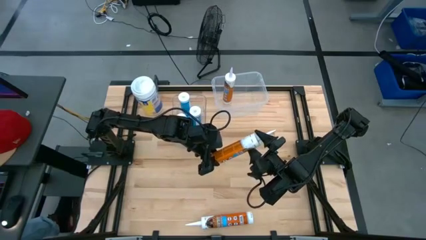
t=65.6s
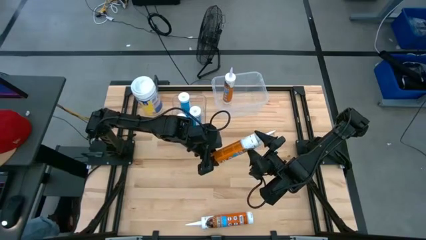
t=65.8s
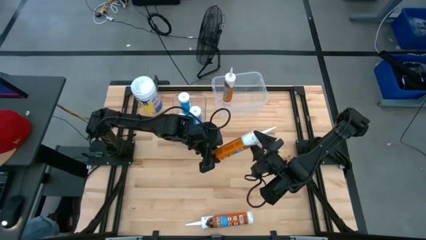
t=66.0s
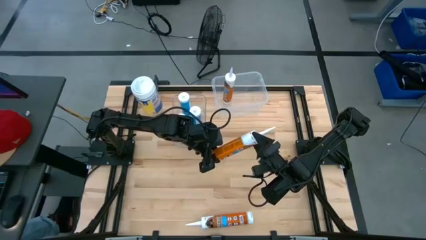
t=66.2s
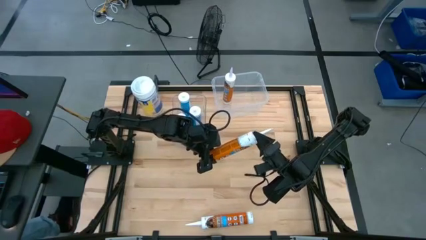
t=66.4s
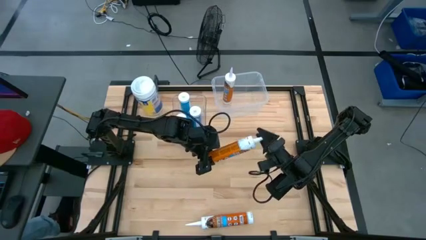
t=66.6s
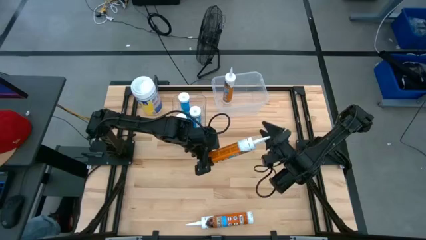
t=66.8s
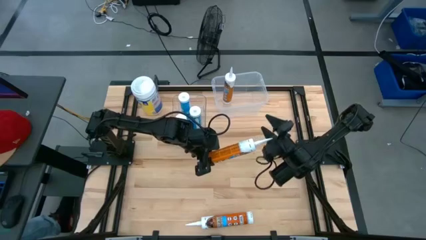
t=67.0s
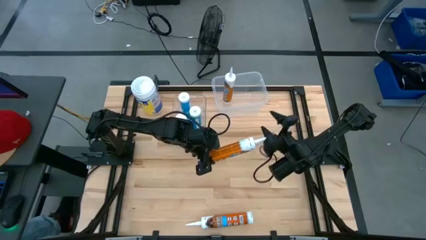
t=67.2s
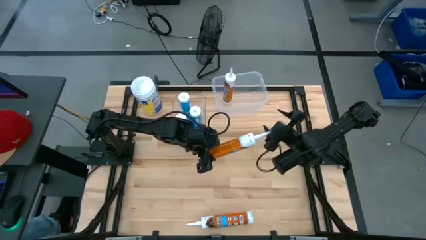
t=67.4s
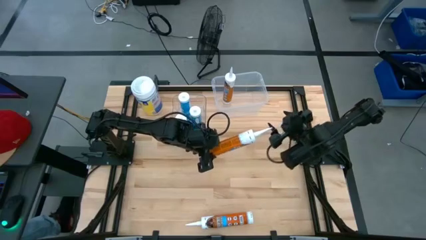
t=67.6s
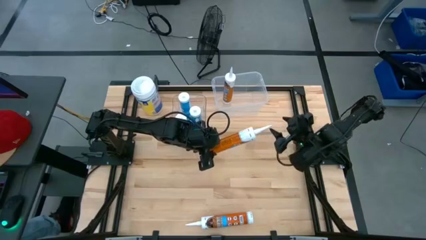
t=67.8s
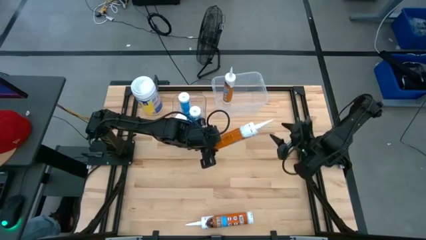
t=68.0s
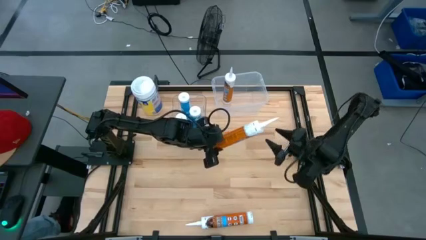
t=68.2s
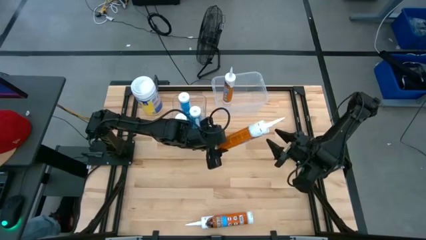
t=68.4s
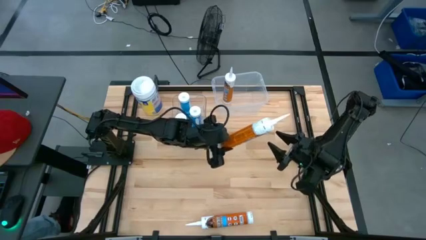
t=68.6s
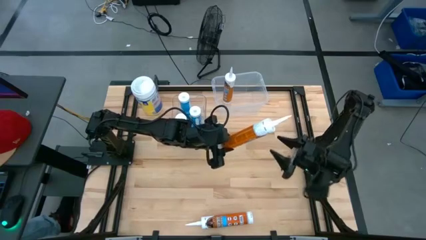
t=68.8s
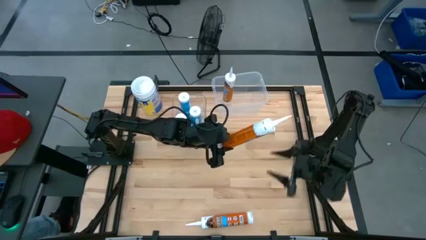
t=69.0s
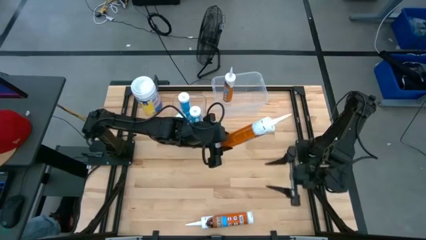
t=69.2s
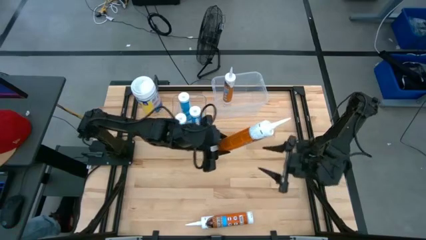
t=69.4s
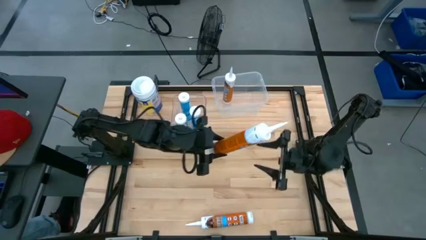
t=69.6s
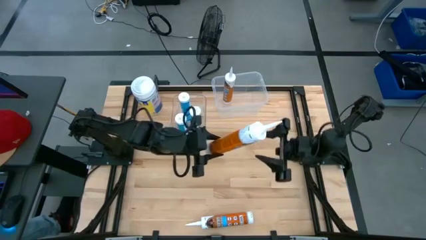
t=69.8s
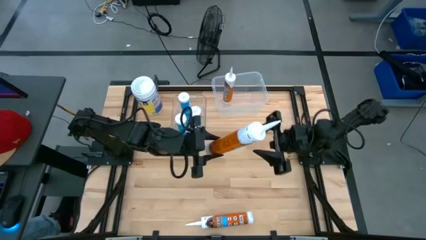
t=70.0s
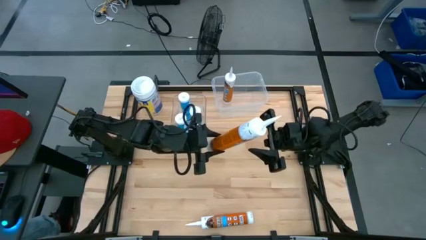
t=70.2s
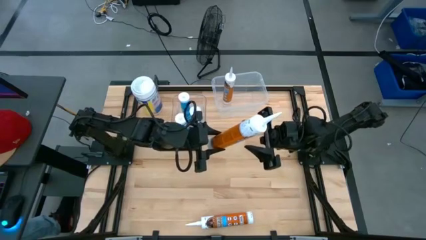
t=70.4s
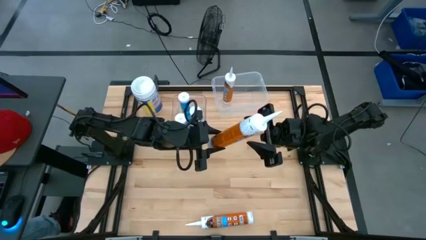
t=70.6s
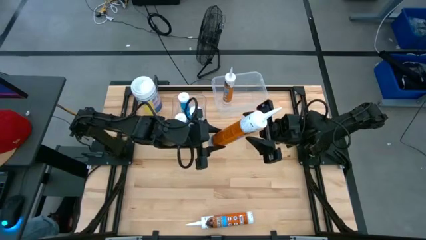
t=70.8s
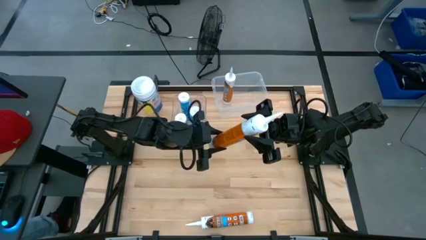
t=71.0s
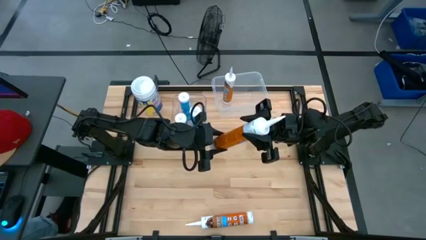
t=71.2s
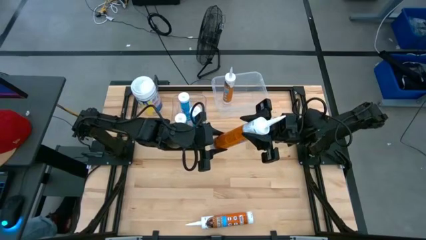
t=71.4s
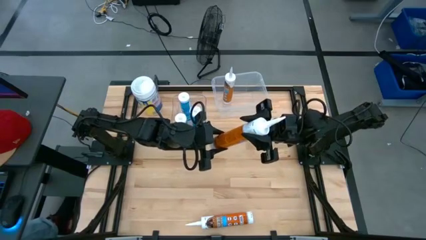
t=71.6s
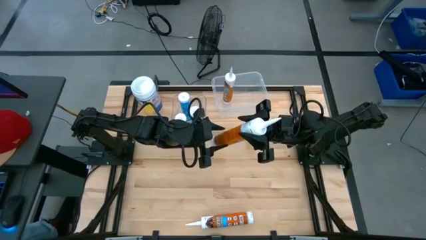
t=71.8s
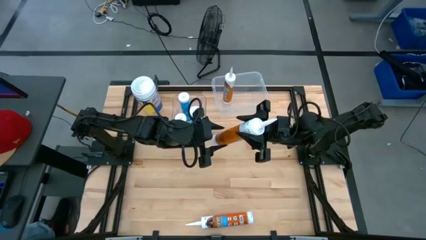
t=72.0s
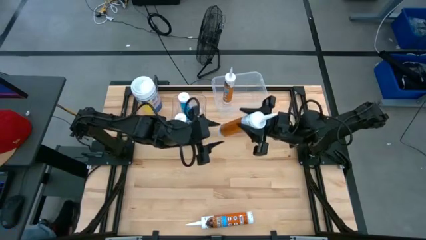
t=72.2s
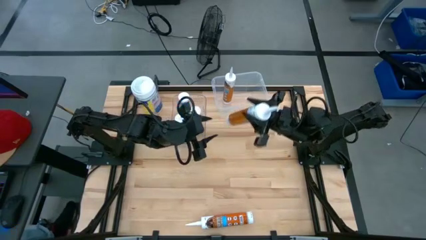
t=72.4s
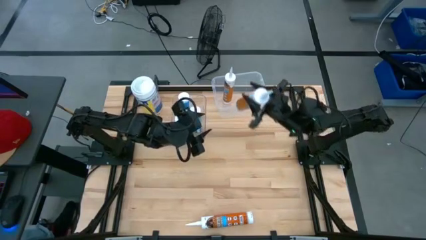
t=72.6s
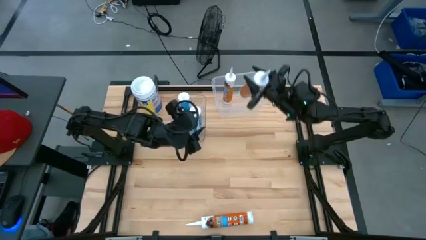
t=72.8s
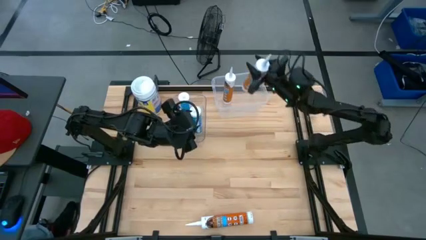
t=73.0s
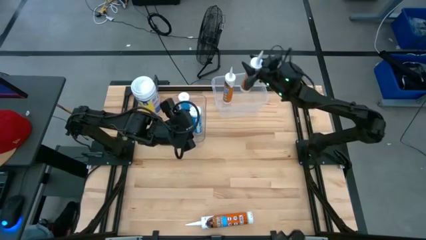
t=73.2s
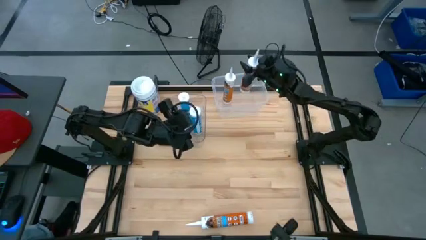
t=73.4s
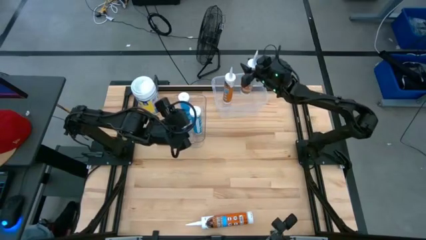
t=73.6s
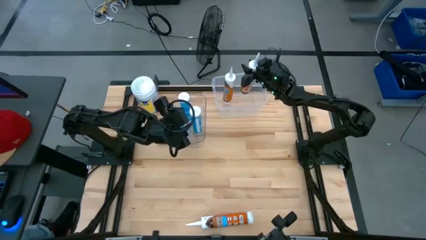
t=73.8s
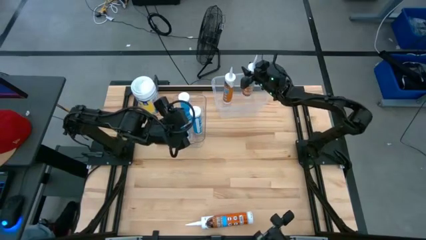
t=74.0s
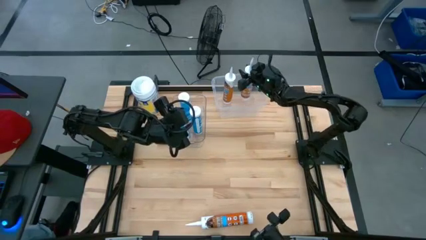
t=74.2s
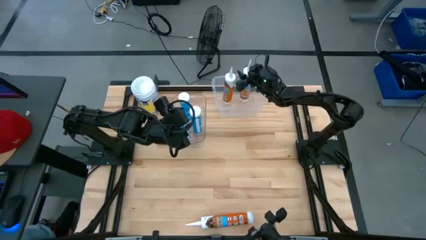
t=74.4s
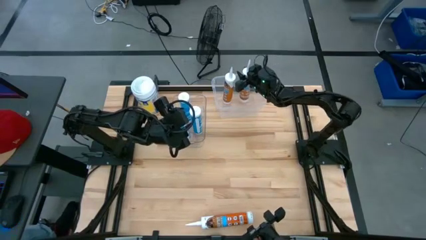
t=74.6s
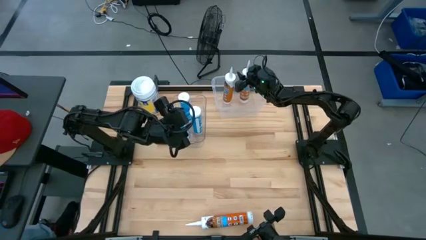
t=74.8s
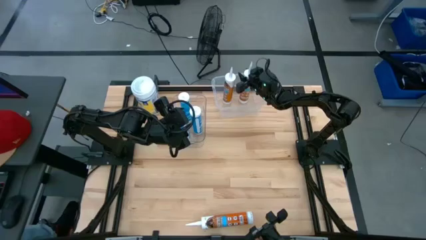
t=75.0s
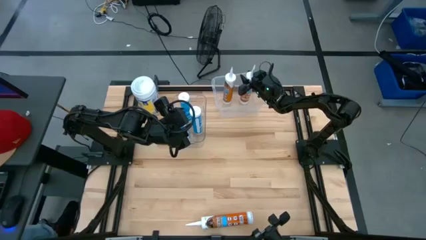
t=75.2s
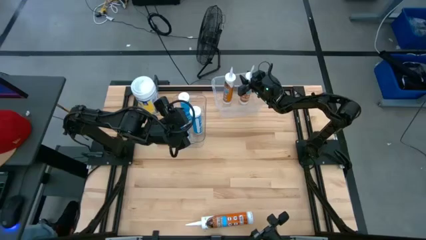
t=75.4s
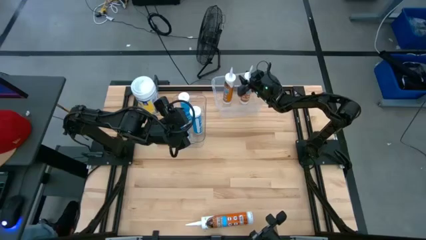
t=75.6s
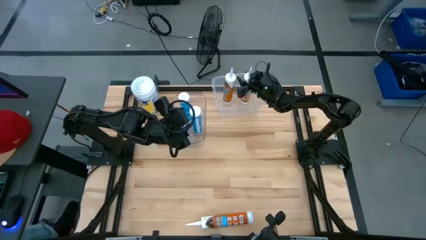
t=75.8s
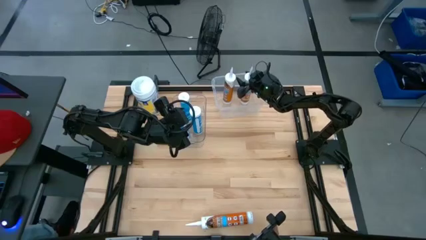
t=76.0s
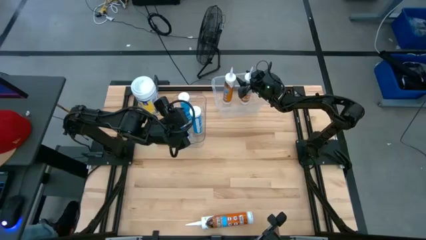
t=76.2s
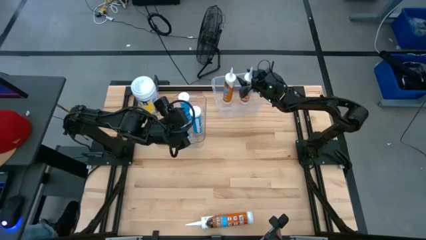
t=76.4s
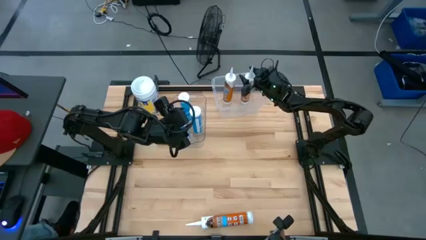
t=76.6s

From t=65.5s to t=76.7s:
Task: Pick & place silicon tubes, Sealant and Lysol wipes
Put the top orange sealant into the white bin

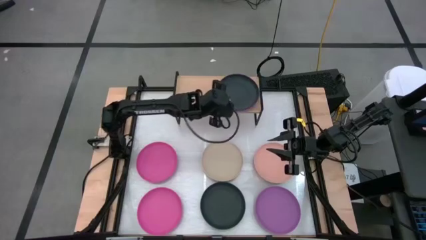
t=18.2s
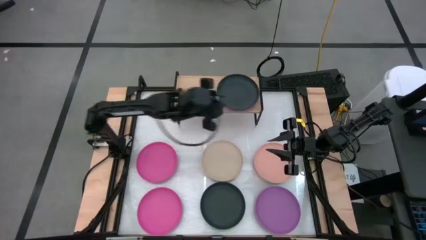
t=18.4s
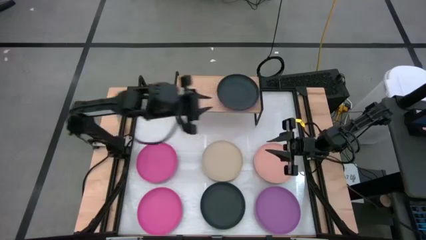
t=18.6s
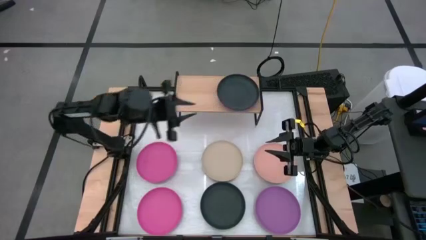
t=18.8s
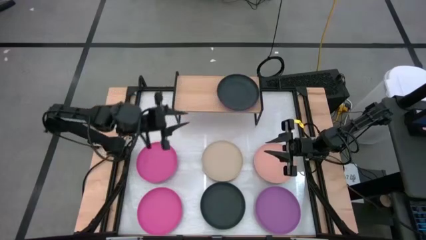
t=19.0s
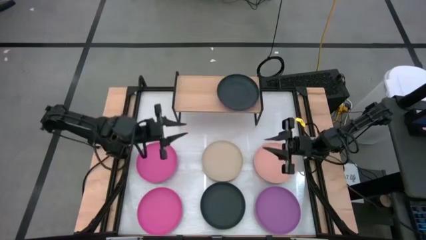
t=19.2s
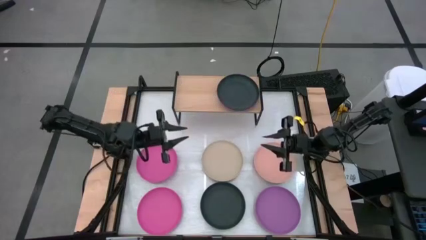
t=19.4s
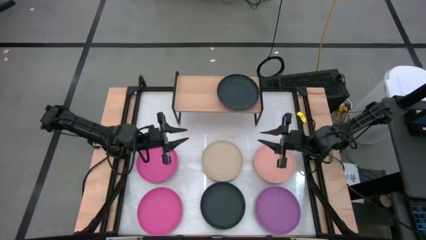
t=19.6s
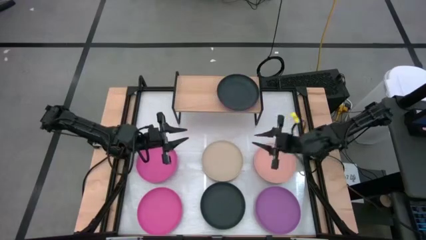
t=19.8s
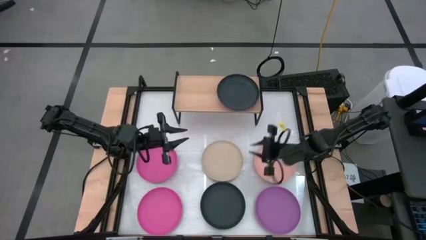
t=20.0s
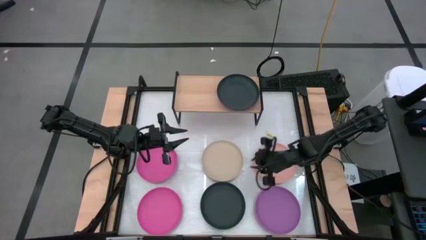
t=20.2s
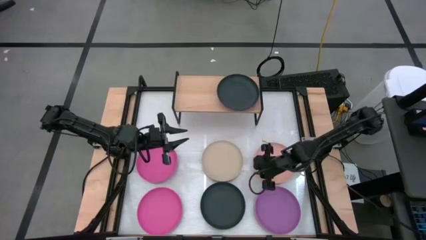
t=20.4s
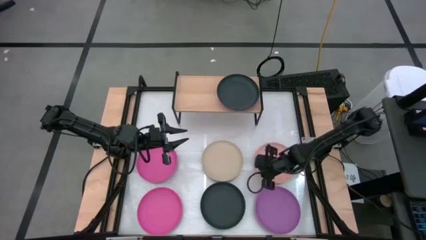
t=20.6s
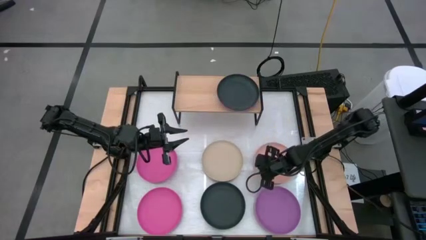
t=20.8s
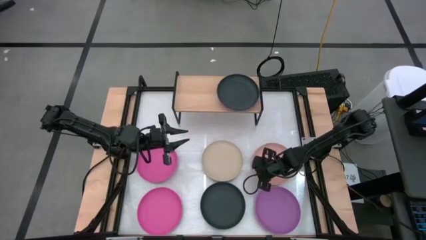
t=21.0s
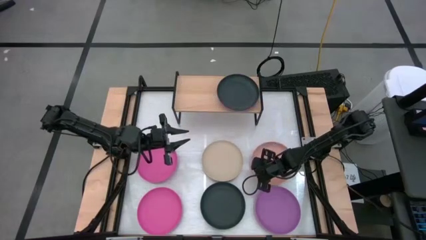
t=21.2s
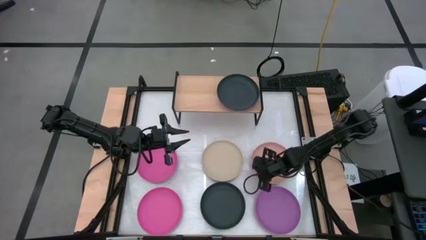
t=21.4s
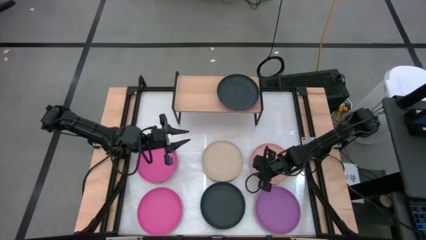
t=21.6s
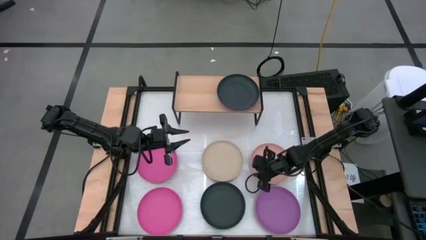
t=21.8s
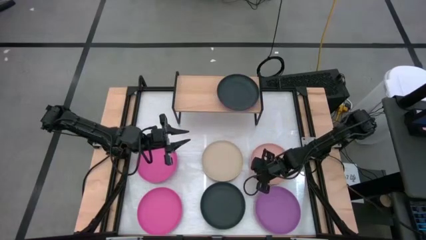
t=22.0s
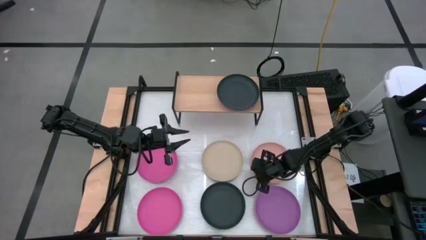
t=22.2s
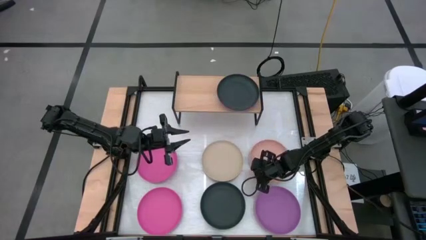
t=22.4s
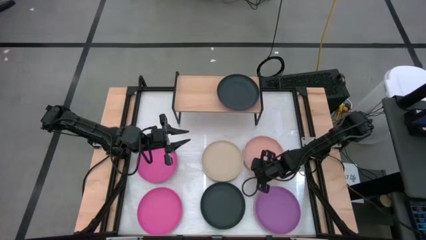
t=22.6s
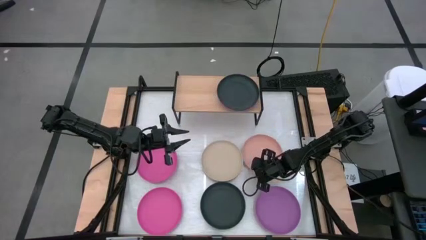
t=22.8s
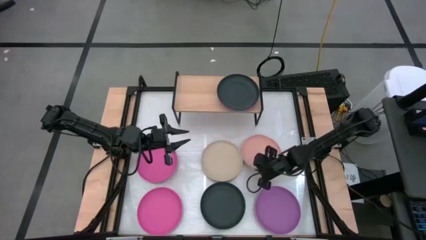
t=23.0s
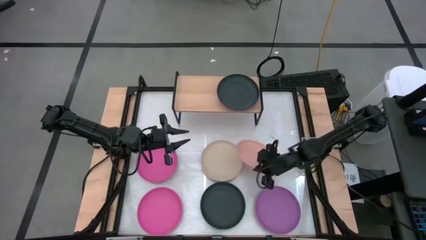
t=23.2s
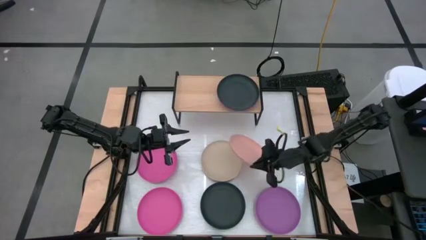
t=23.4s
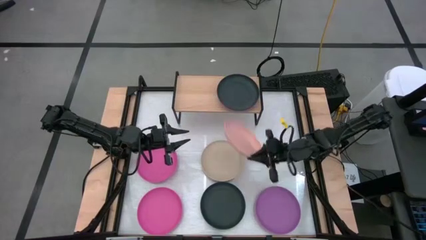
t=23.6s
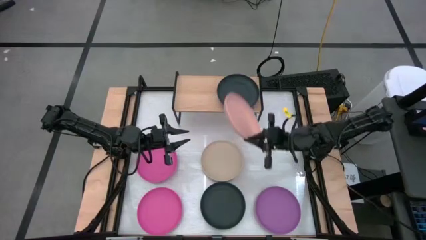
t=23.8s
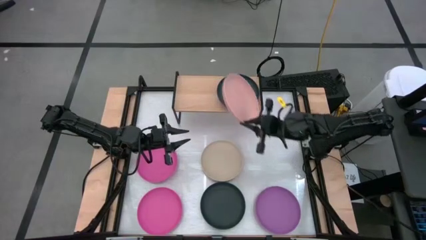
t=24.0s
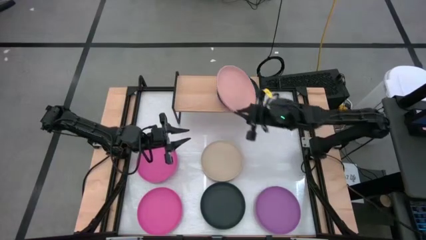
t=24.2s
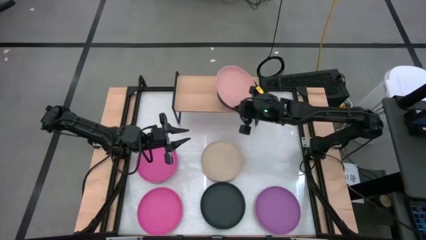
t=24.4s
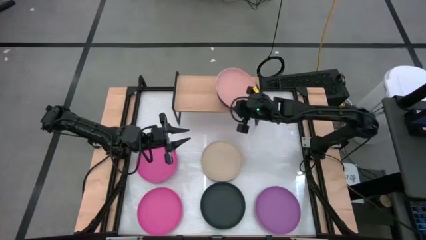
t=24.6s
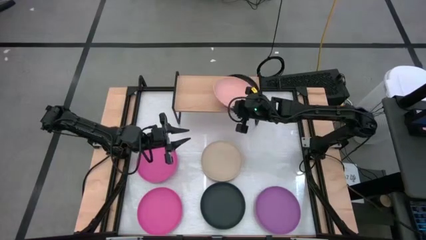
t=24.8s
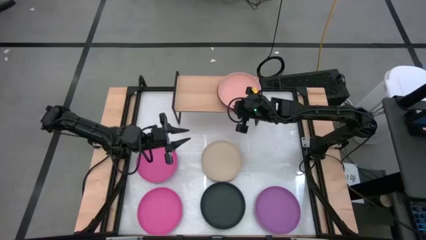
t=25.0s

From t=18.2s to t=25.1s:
Task: Place and stack plates onto a shelf
Stack the light pink plate on top of the black plate on the shelf
